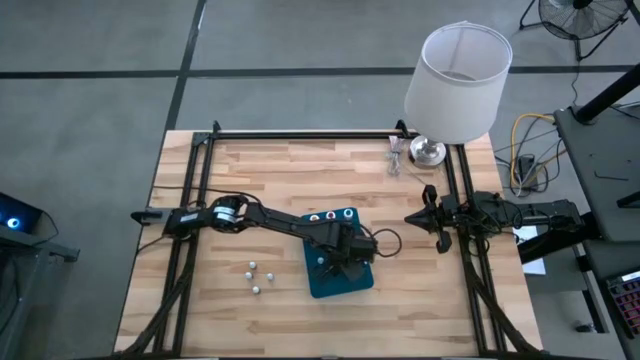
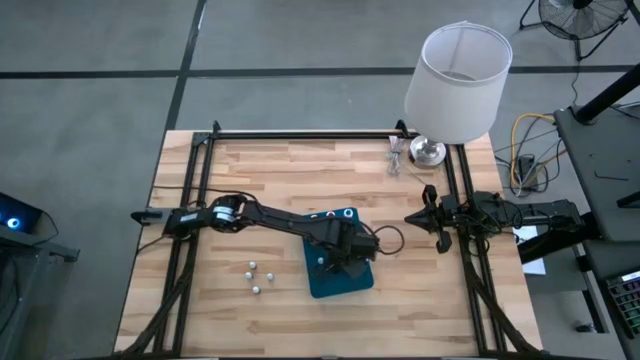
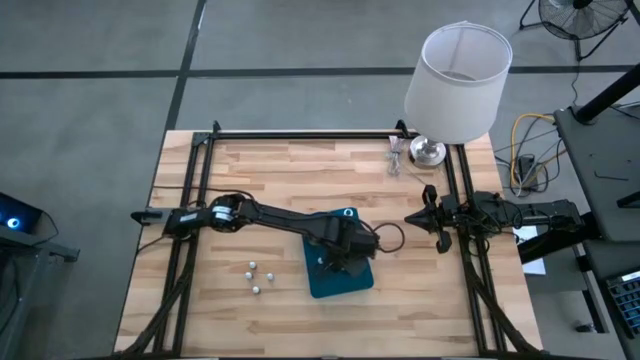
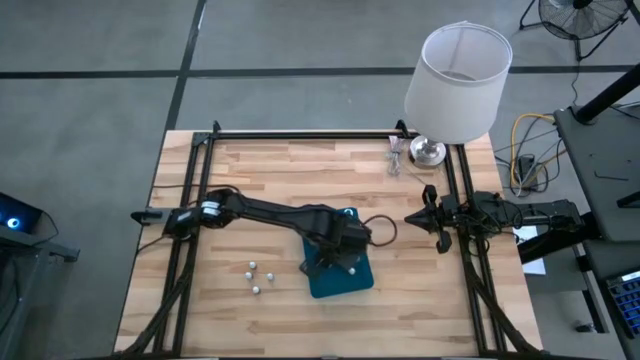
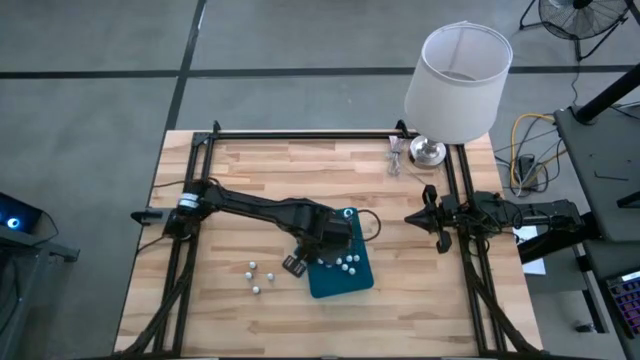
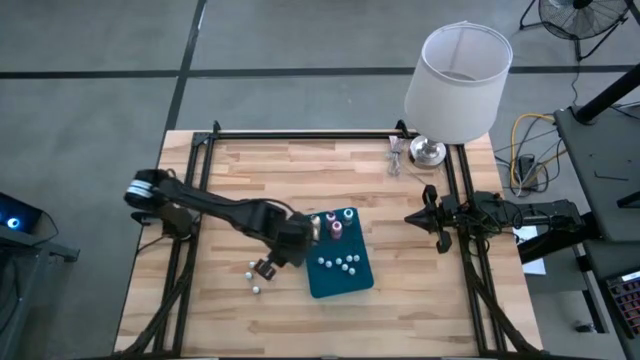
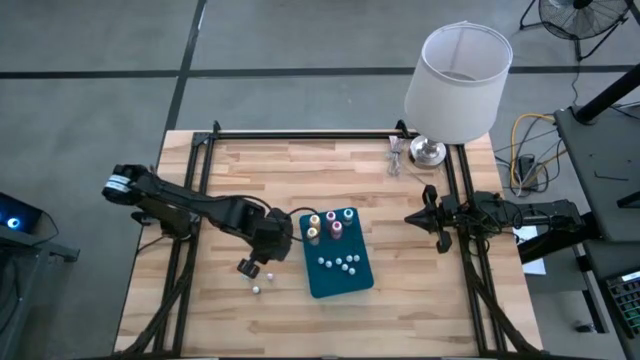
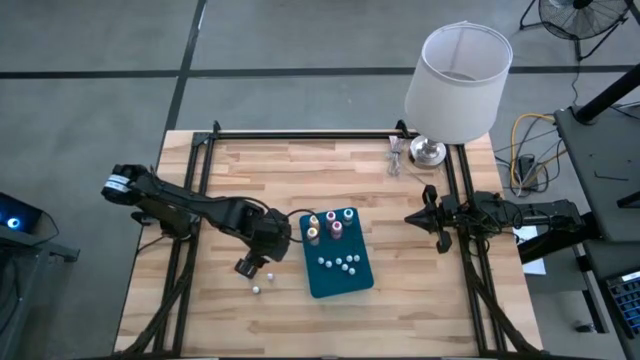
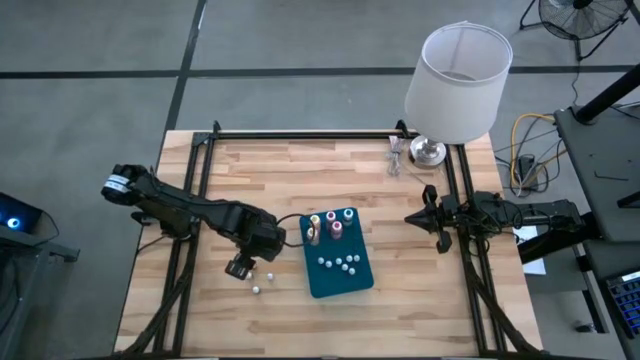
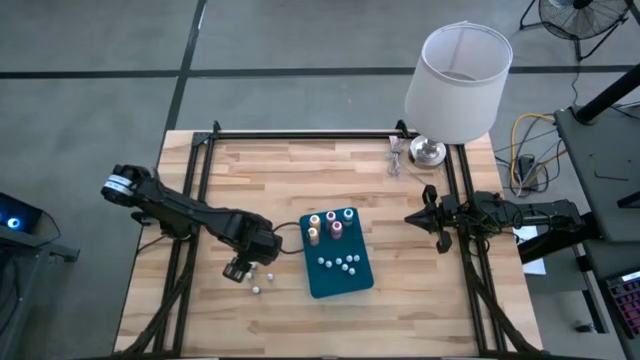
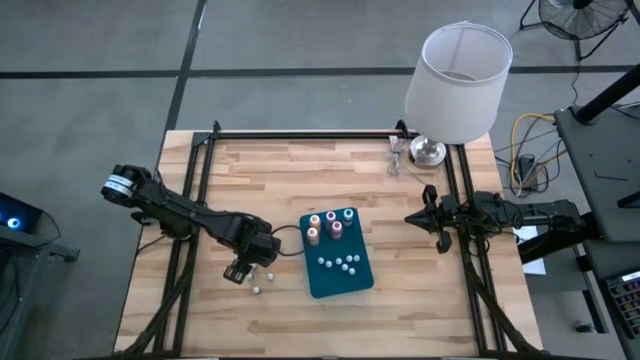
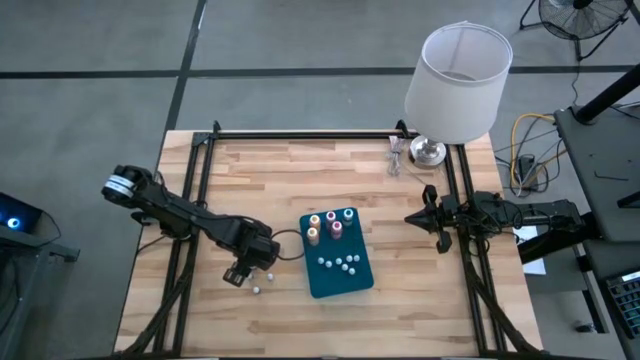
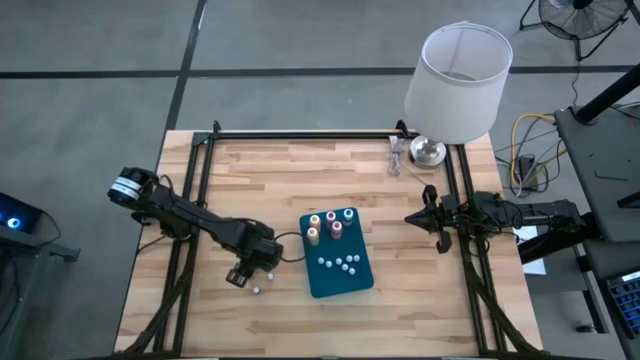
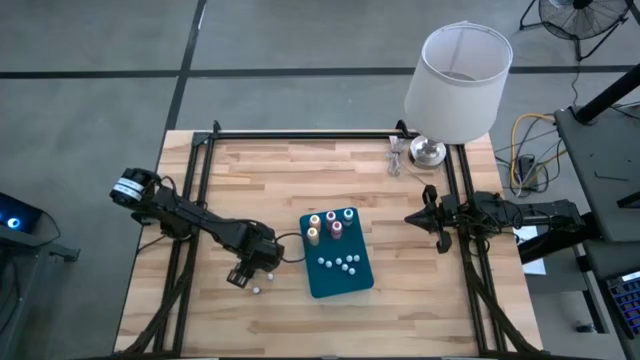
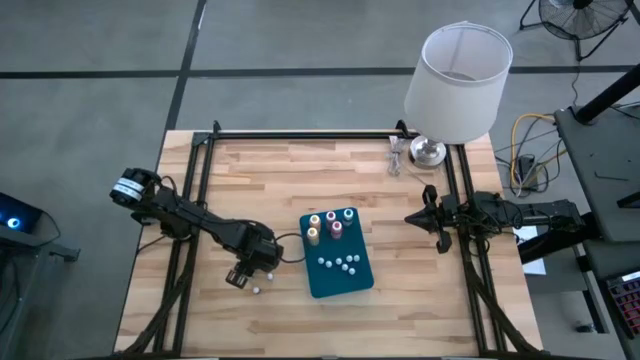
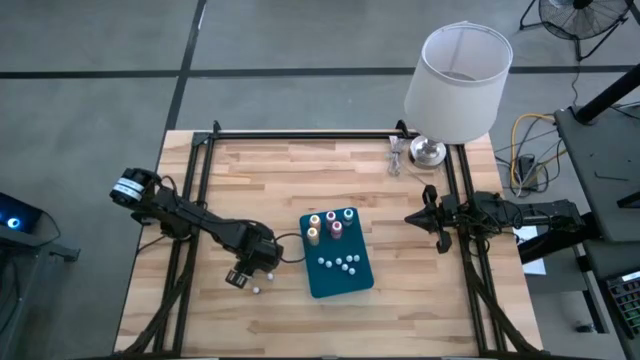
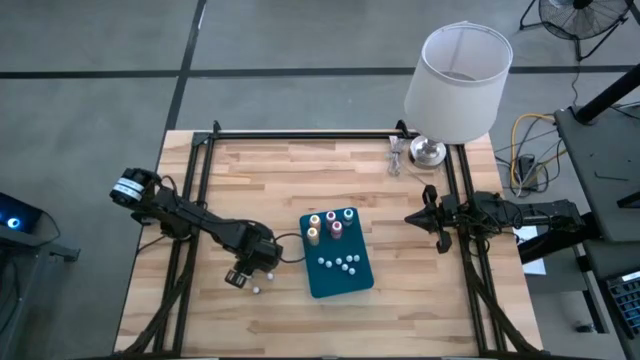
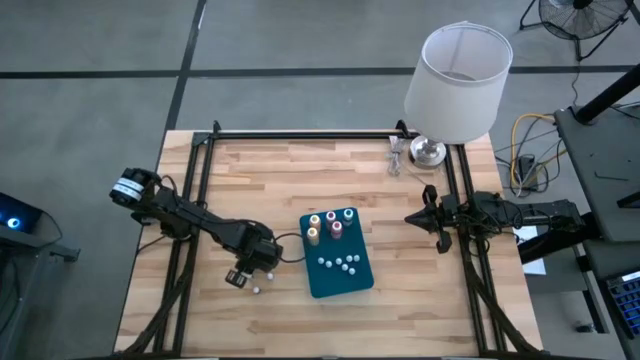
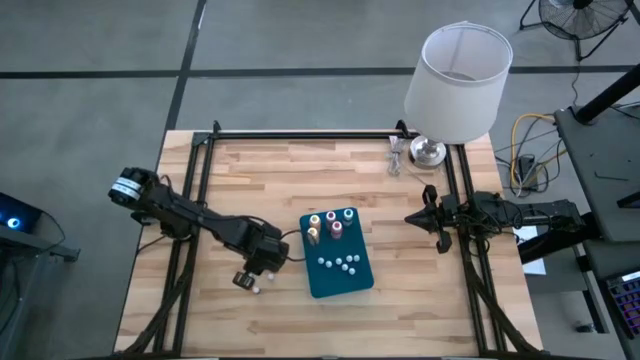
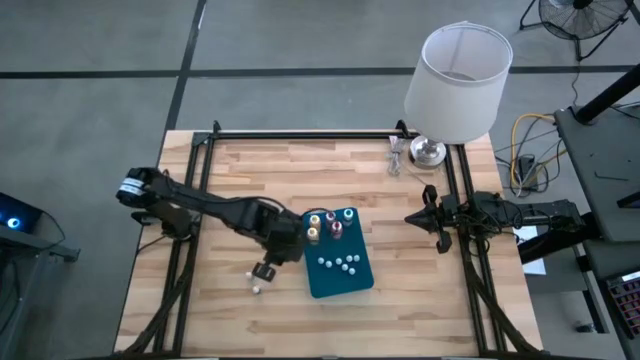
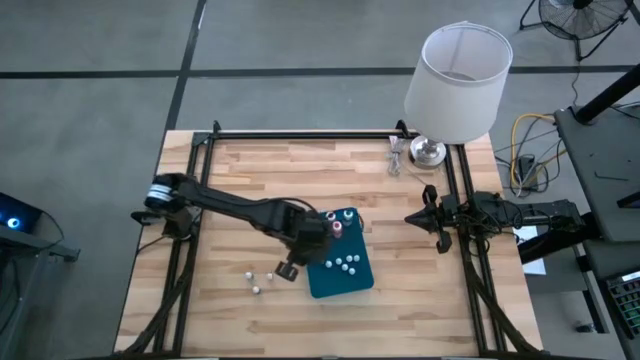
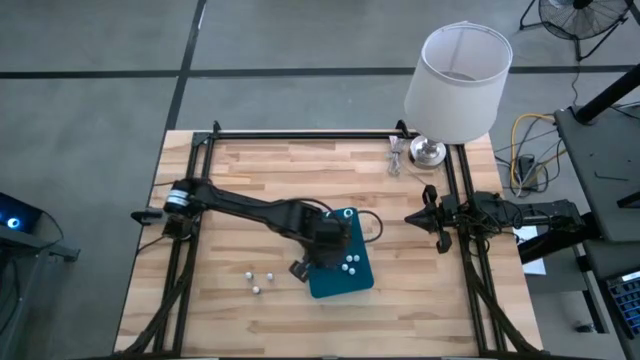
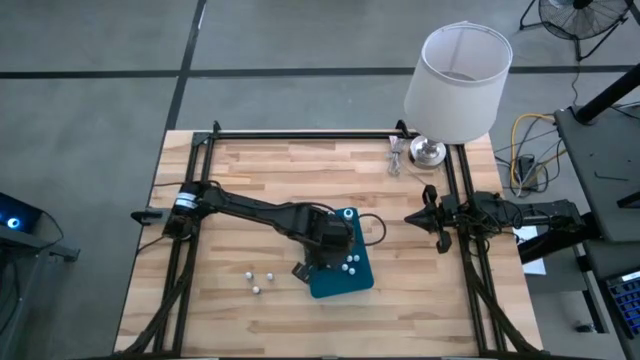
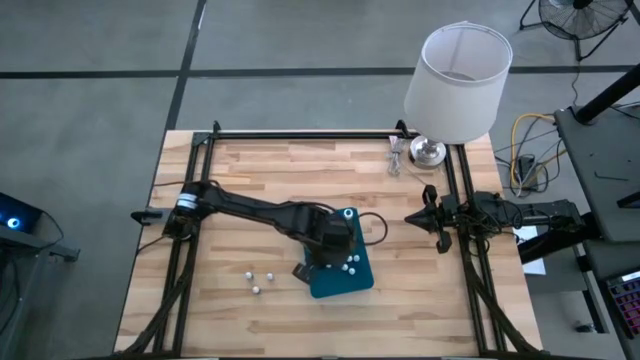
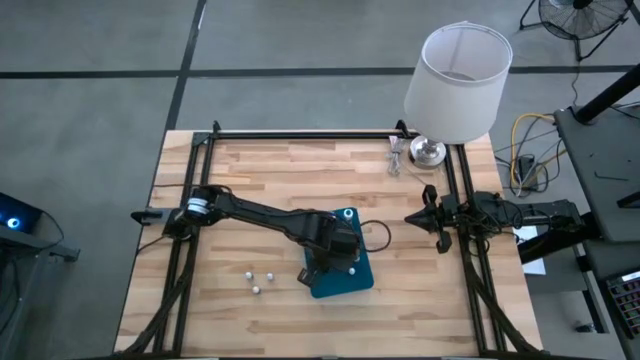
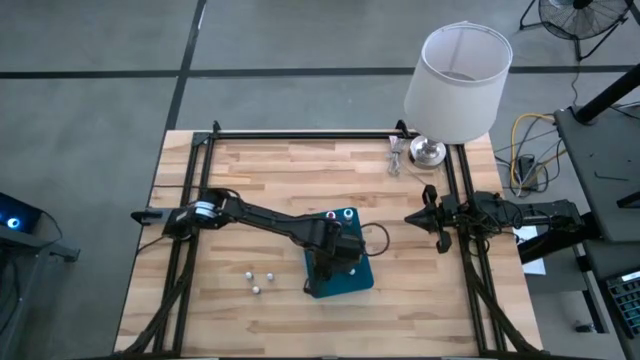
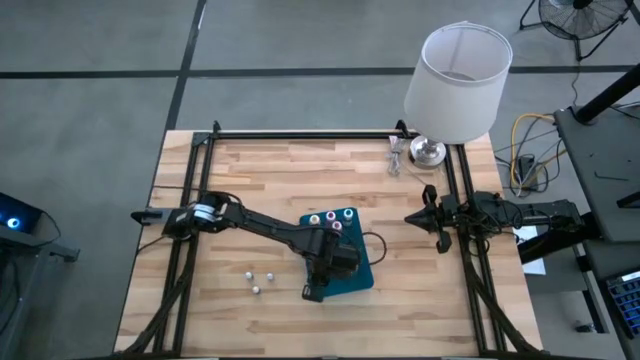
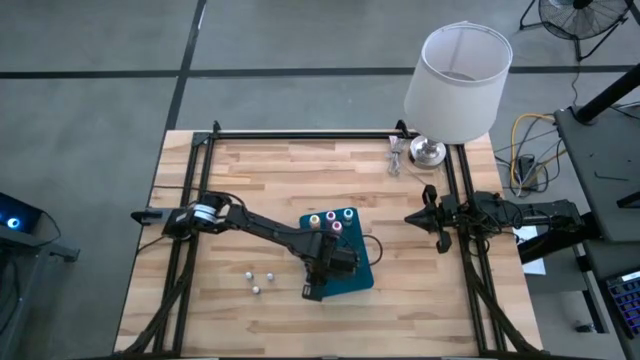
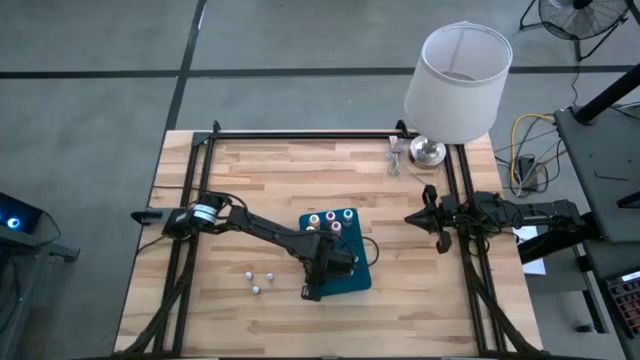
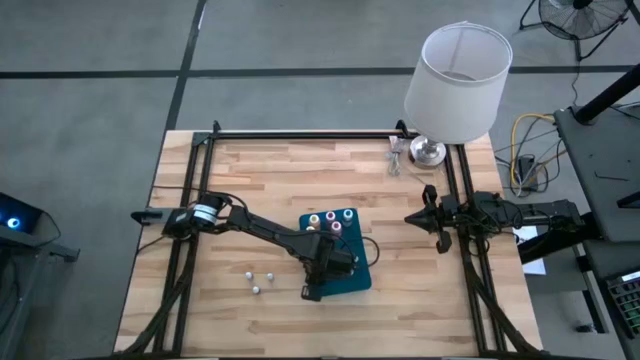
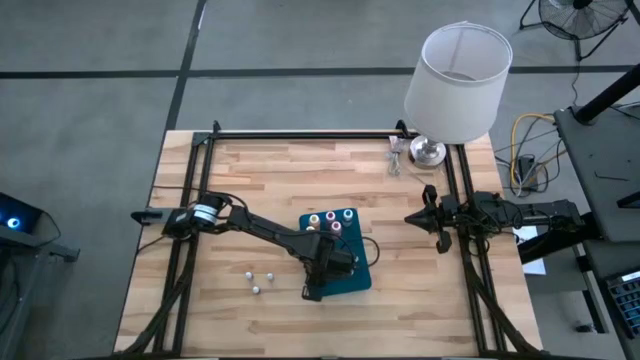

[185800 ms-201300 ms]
Task: Pick & Place food coloring
Put the small dark blue food coloring bottle into the blue bin

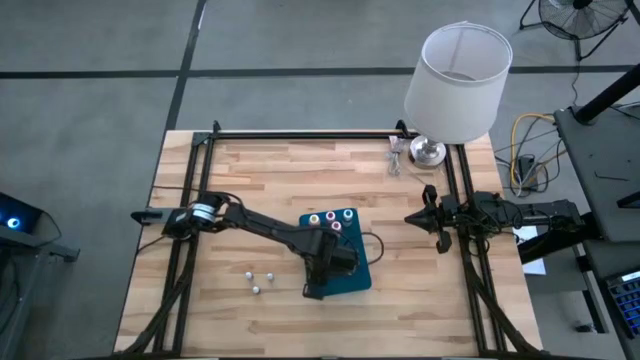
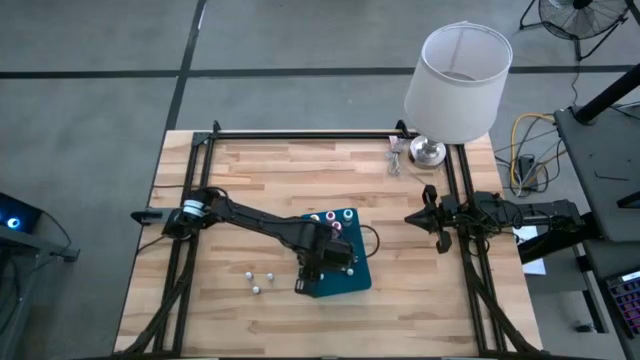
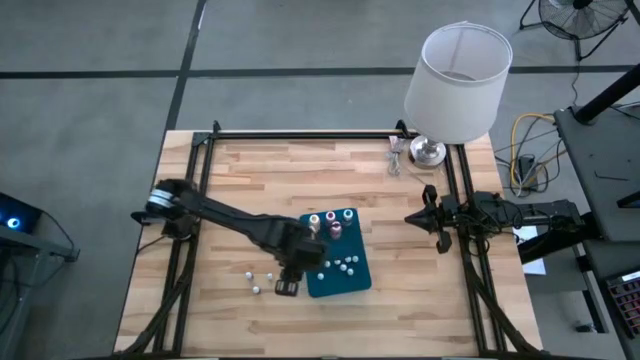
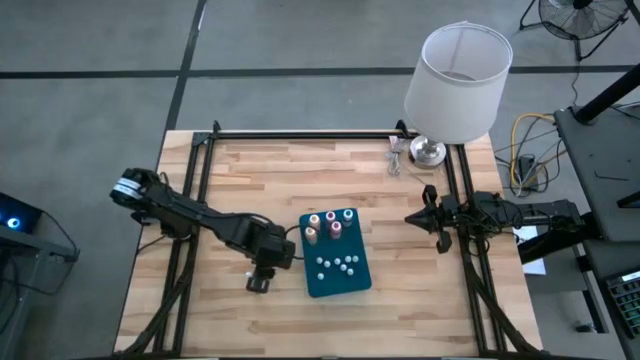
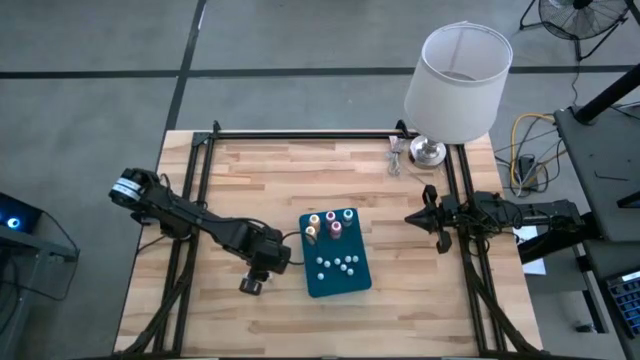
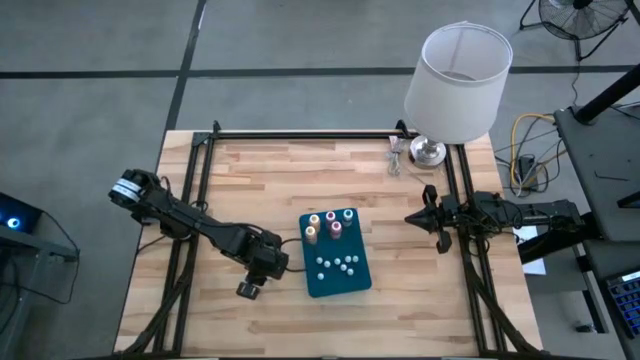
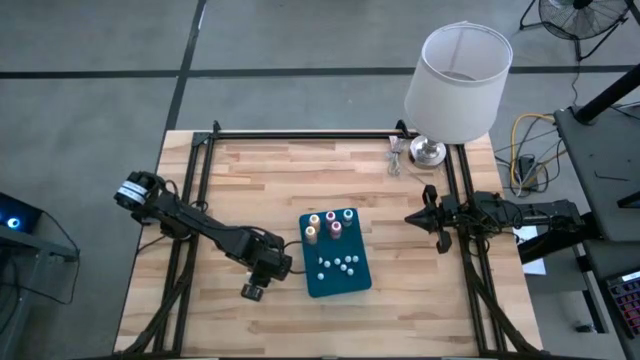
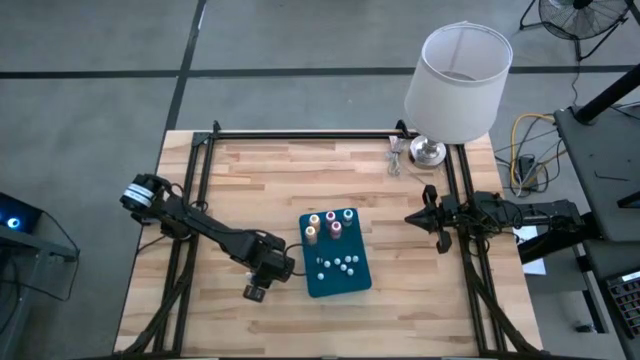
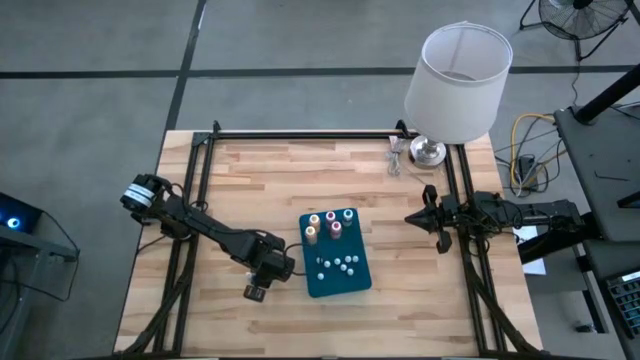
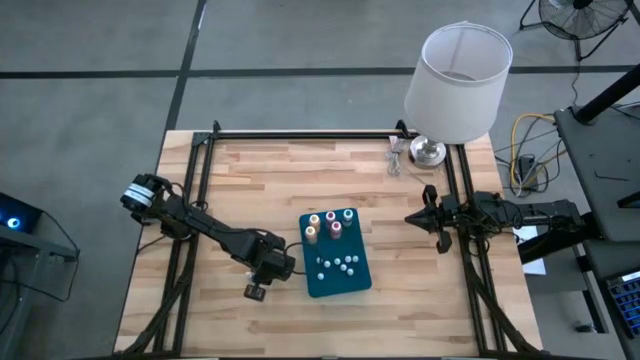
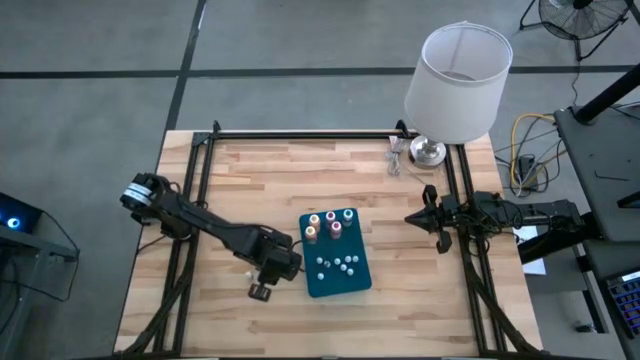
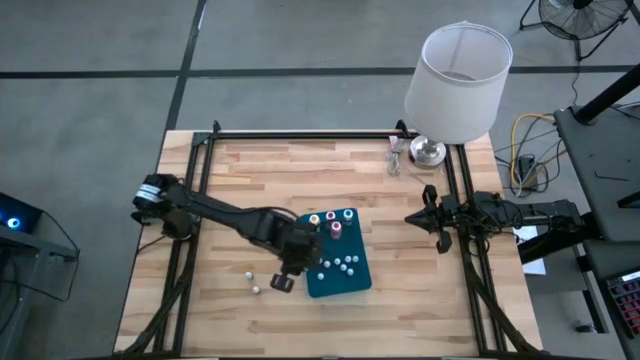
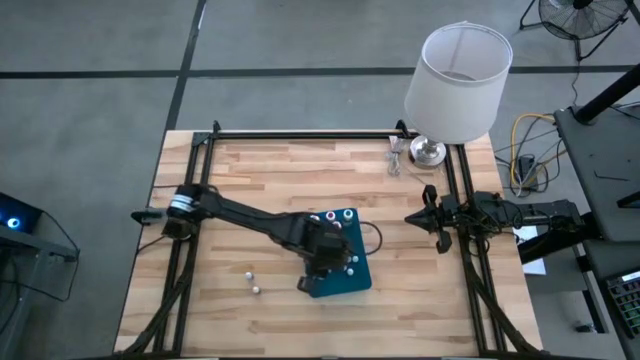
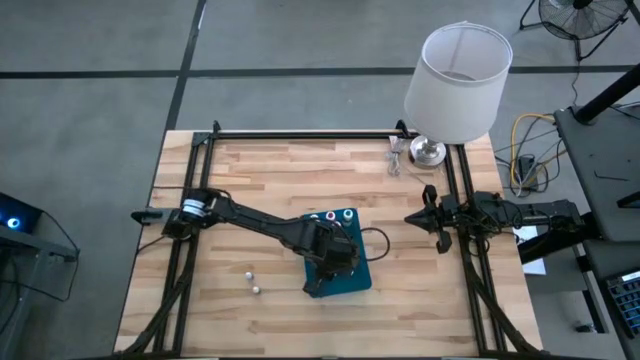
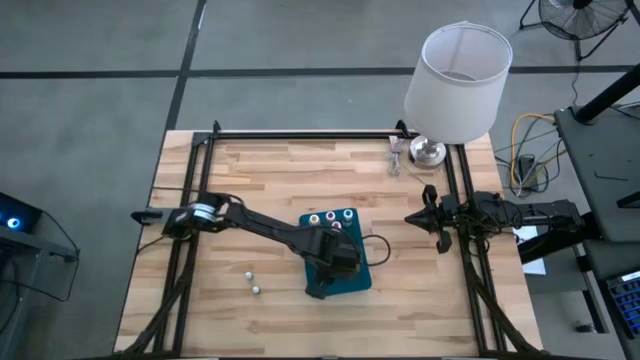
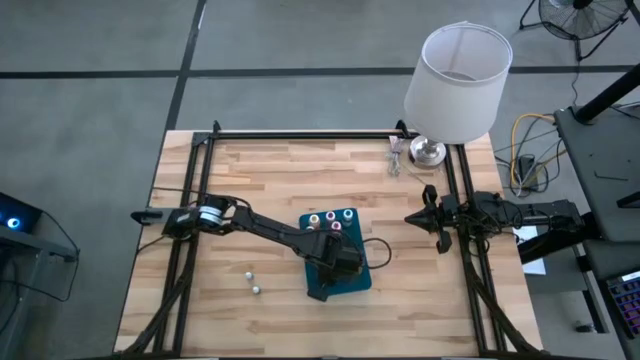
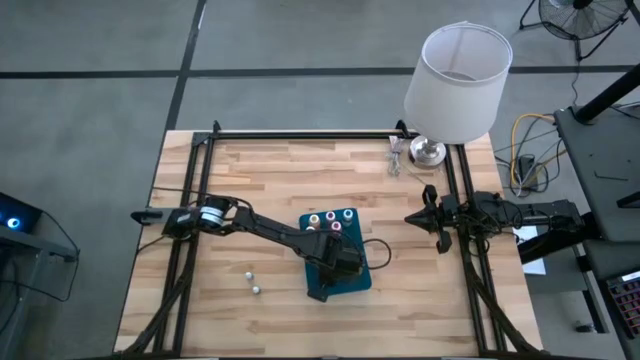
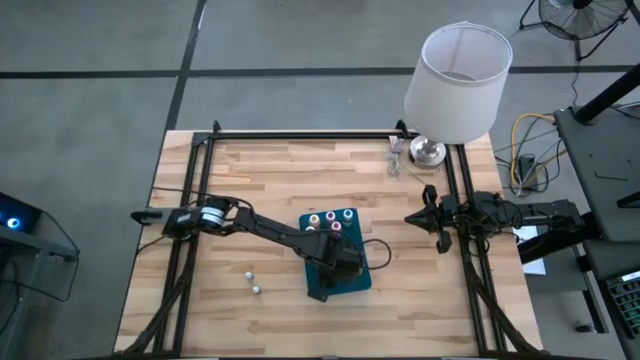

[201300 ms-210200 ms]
Put the small red food coloring bottle into the blue bin
